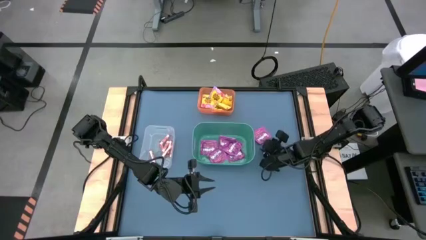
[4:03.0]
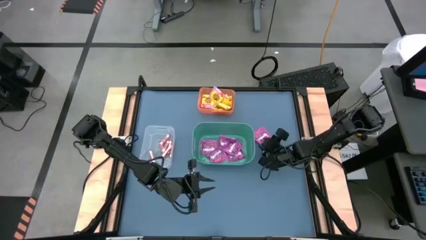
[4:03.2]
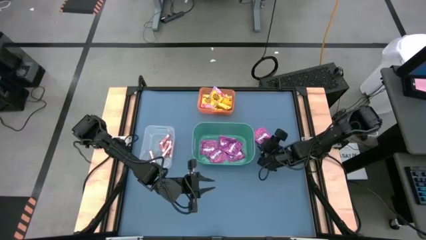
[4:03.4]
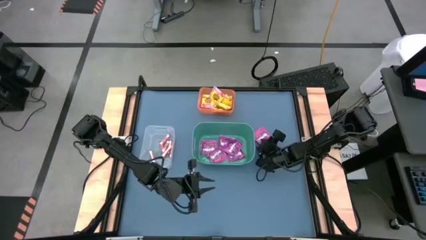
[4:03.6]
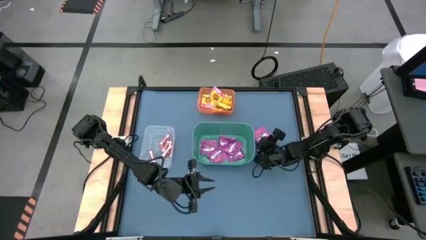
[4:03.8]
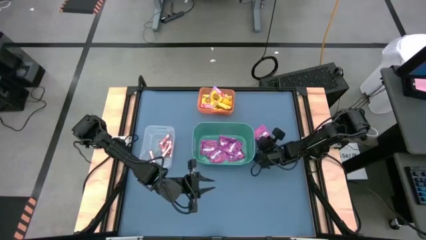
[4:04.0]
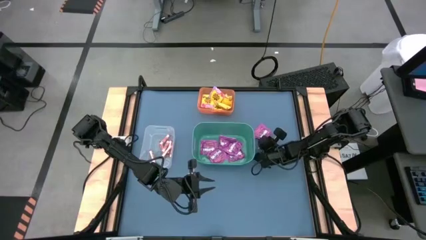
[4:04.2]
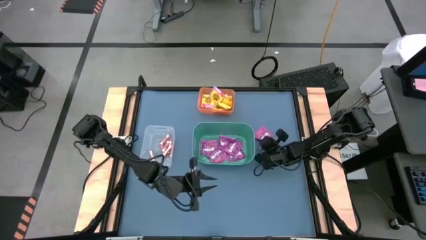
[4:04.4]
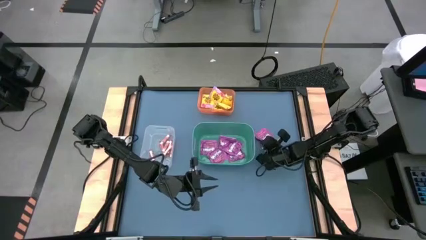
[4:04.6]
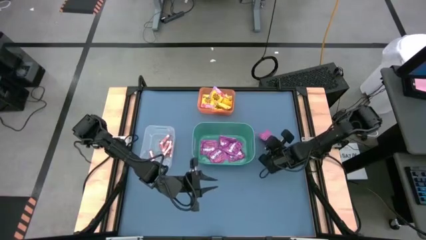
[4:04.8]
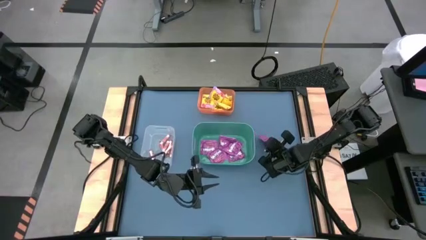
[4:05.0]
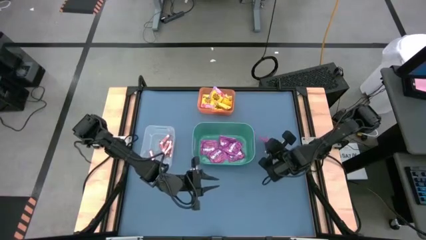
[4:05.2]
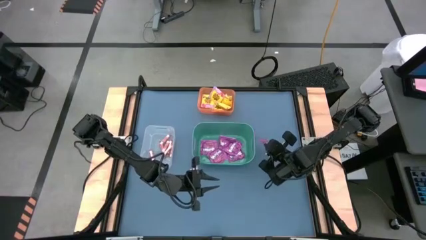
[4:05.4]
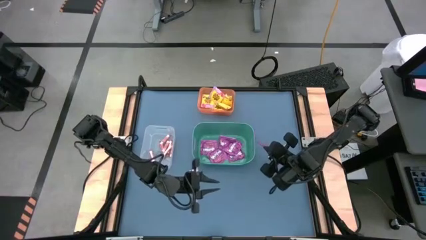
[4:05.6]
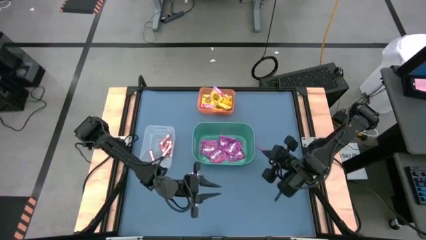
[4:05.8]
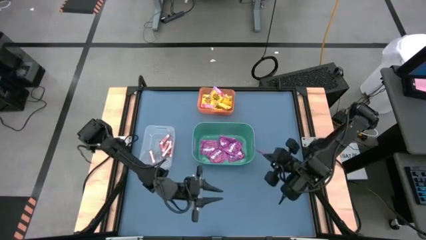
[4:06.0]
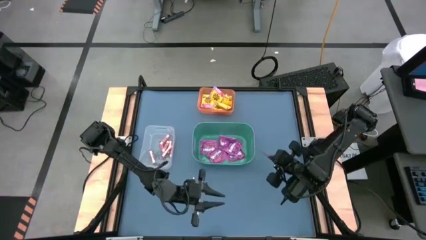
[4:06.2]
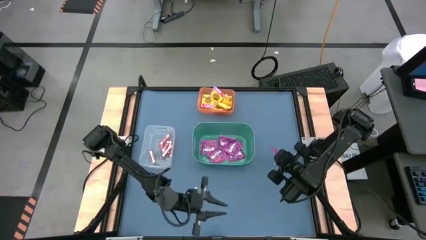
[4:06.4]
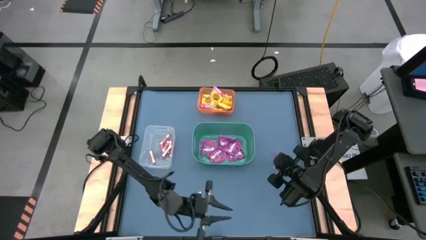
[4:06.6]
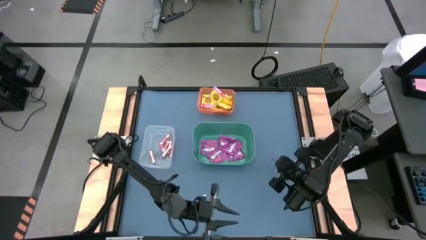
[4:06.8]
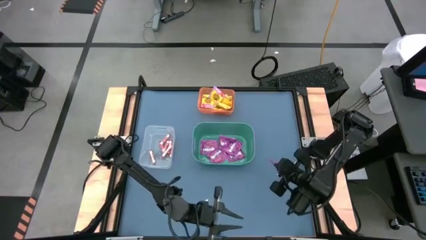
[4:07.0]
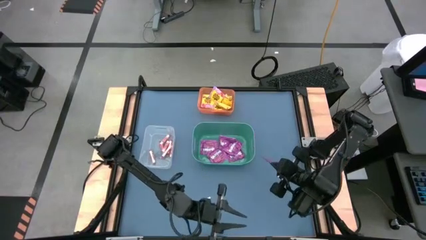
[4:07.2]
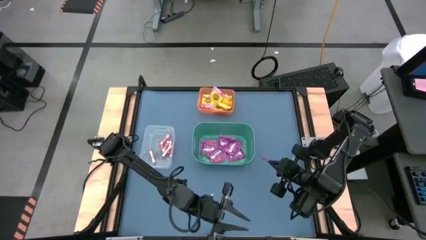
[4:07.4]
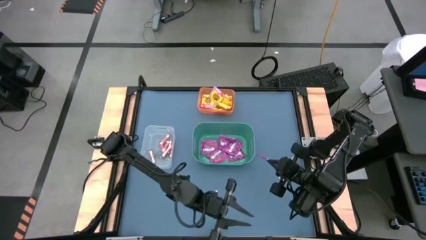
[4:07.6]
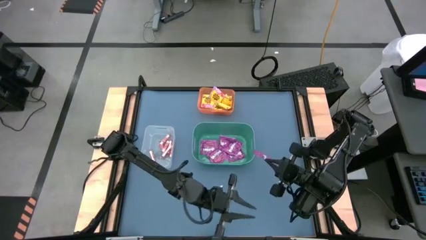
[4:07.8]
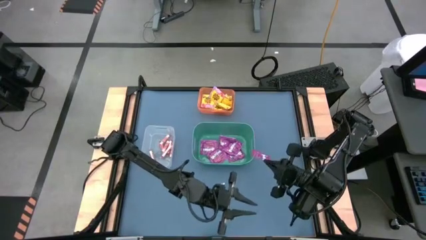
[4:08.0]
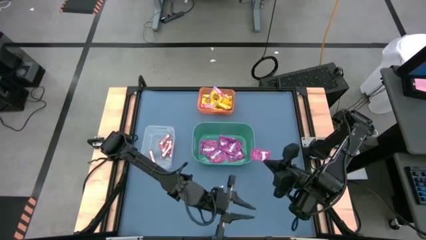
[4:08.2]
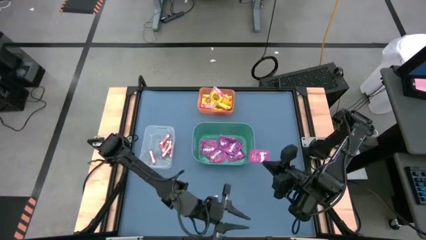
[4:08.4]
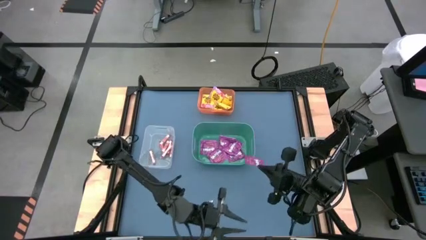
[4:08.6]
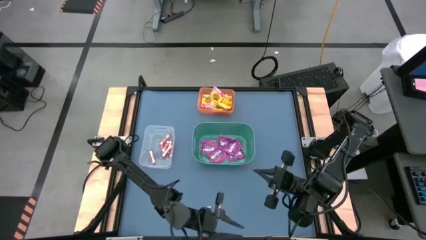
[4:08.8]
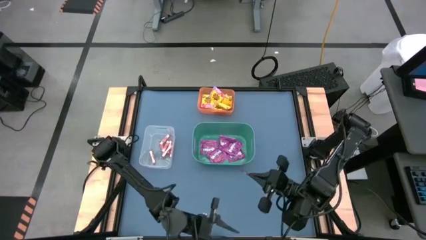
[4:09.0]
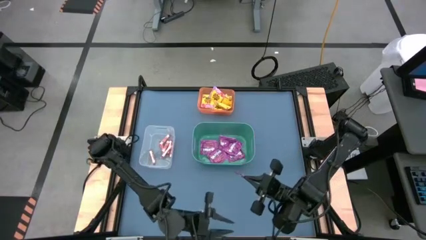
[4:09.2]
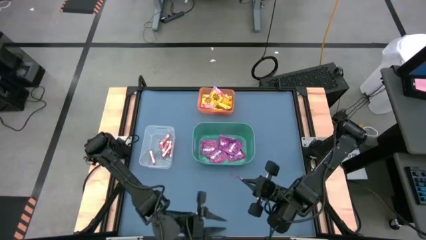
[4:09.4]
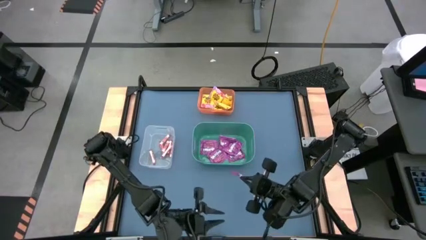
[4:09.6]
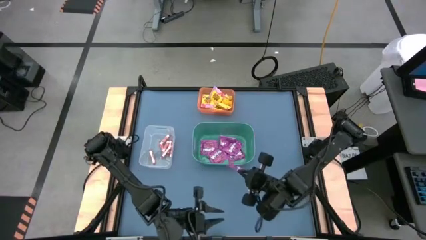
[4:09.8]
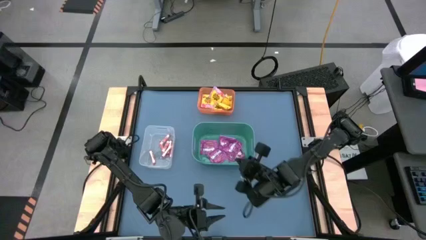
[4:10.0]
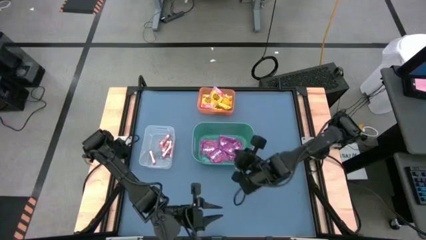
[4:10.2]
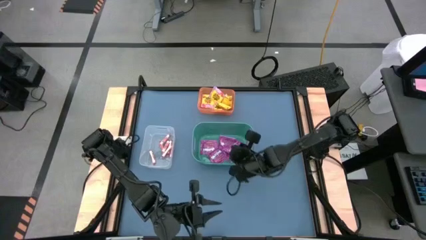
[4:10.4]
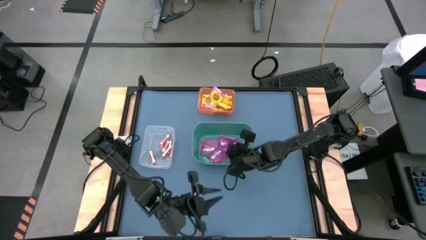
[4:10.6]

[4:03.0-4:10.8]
Task: Sort candy
Put the purple candy into the green bin

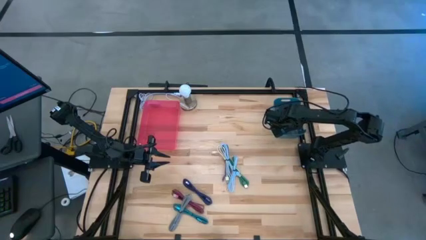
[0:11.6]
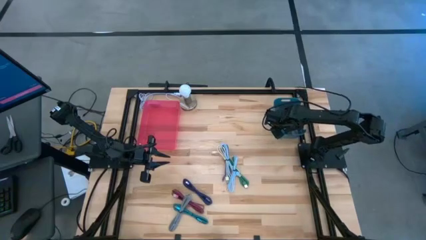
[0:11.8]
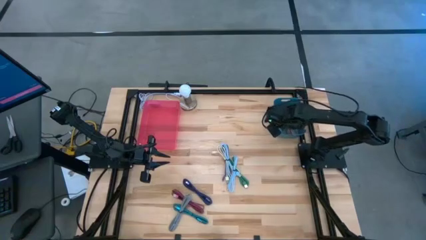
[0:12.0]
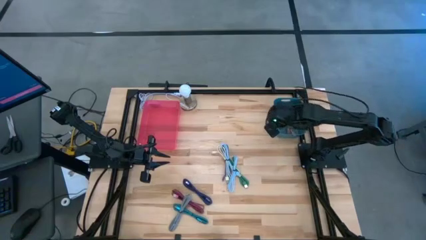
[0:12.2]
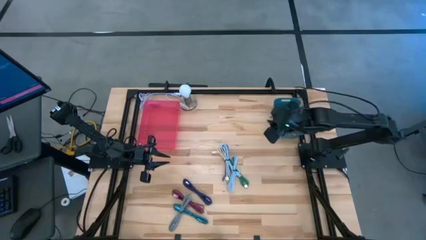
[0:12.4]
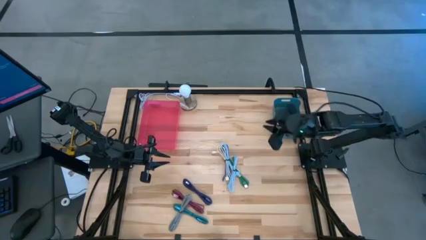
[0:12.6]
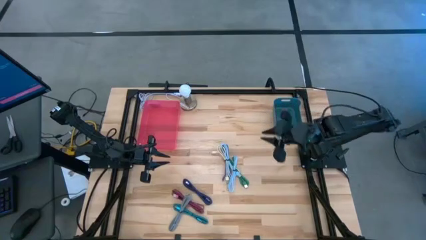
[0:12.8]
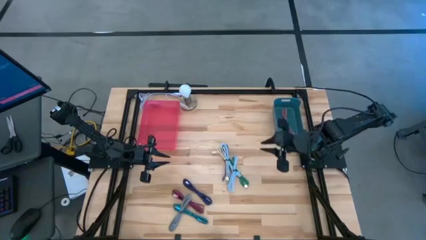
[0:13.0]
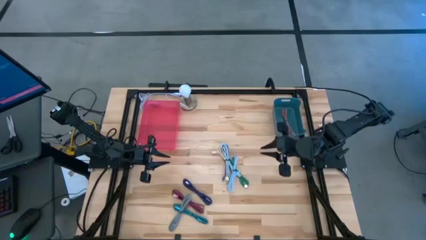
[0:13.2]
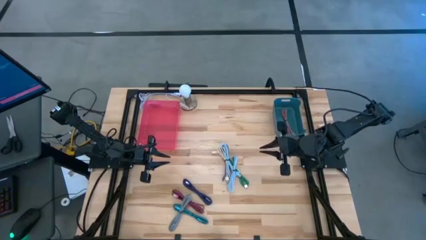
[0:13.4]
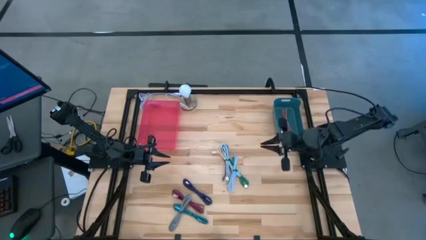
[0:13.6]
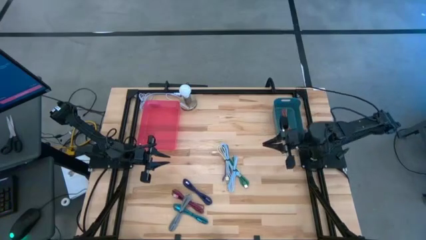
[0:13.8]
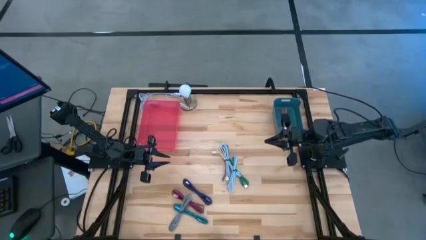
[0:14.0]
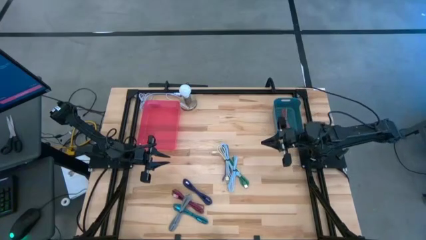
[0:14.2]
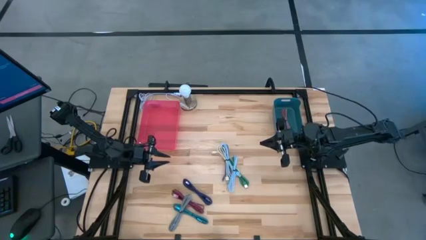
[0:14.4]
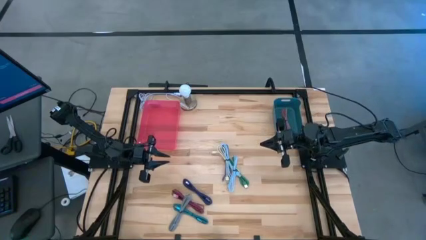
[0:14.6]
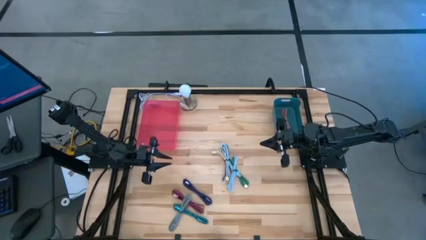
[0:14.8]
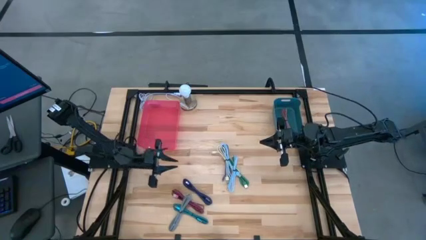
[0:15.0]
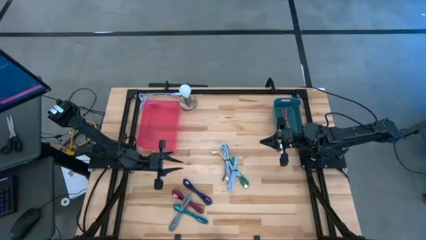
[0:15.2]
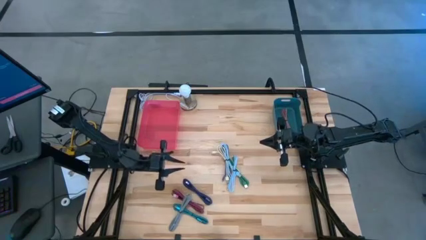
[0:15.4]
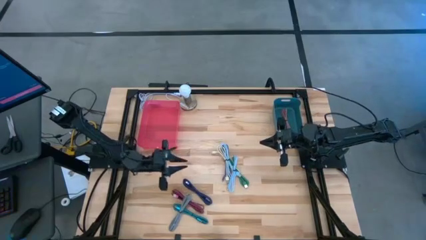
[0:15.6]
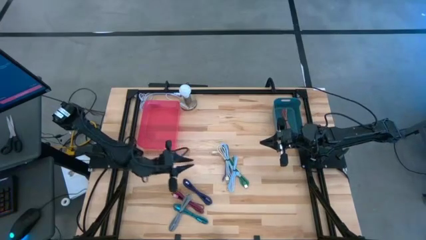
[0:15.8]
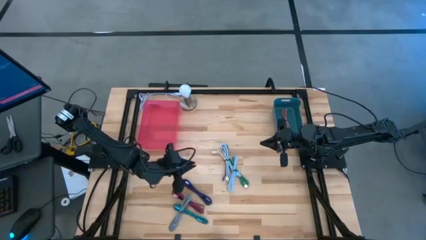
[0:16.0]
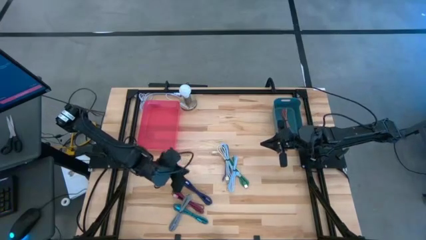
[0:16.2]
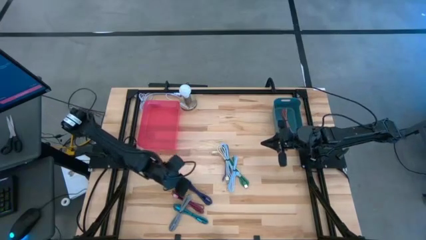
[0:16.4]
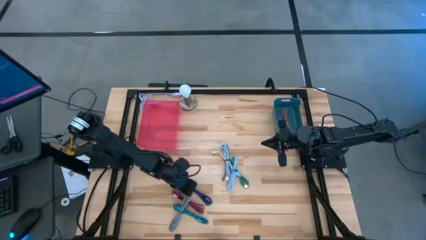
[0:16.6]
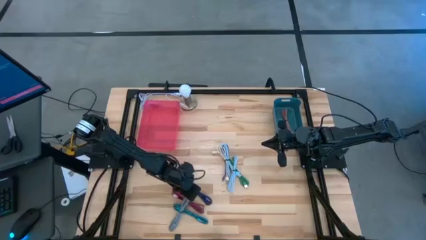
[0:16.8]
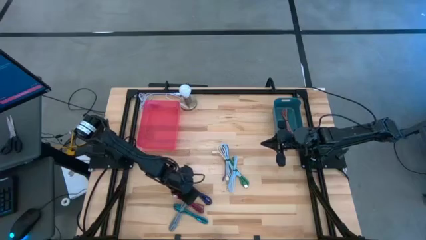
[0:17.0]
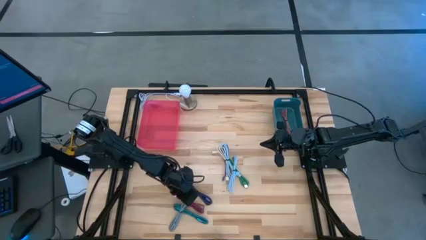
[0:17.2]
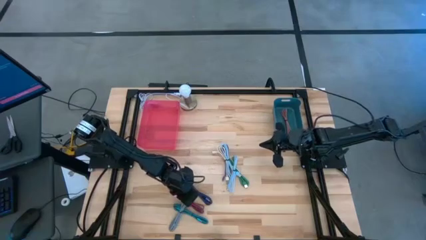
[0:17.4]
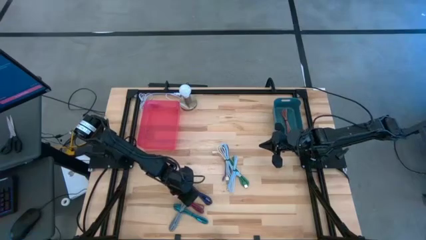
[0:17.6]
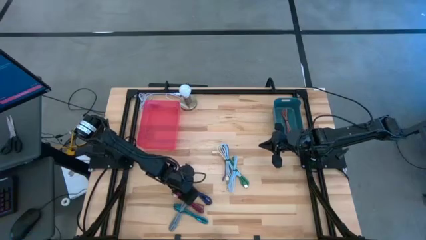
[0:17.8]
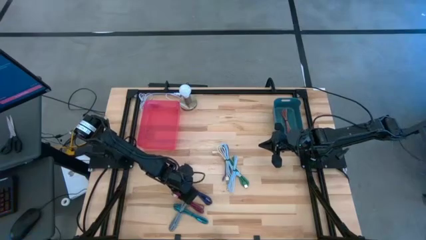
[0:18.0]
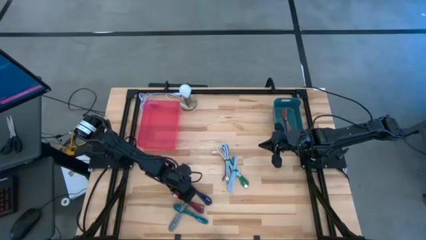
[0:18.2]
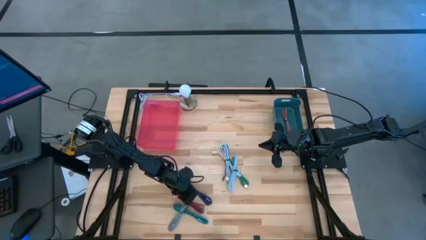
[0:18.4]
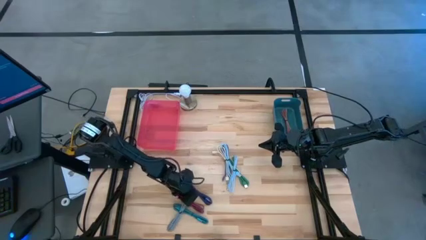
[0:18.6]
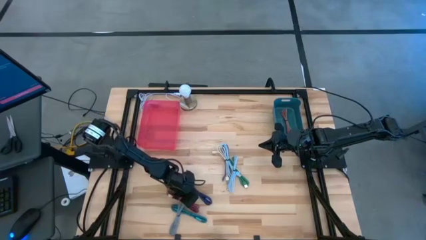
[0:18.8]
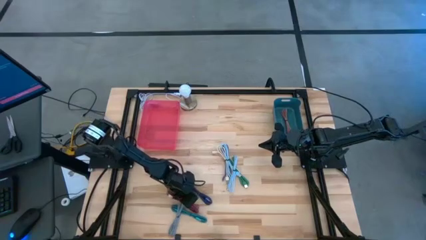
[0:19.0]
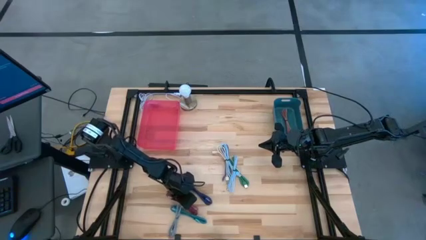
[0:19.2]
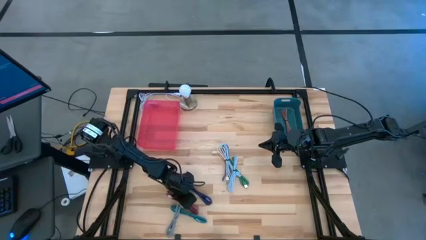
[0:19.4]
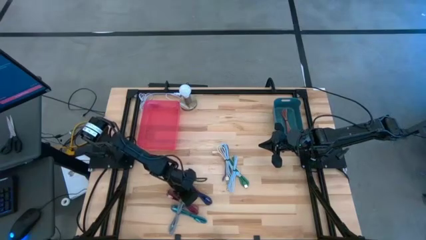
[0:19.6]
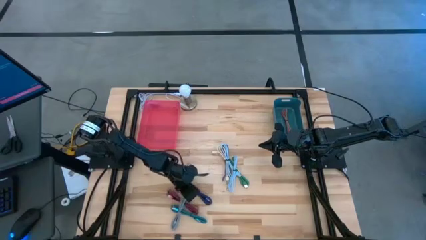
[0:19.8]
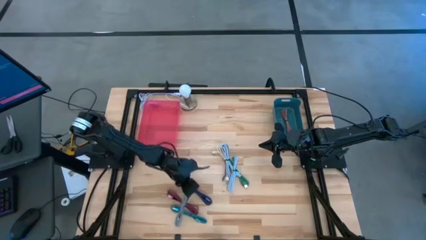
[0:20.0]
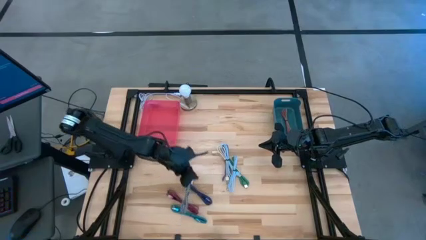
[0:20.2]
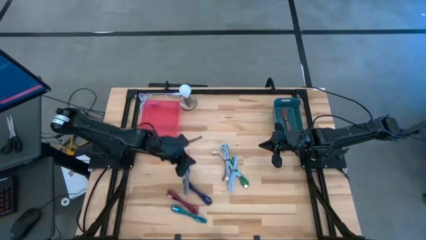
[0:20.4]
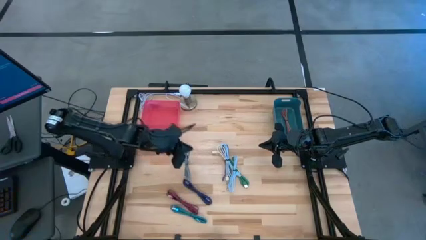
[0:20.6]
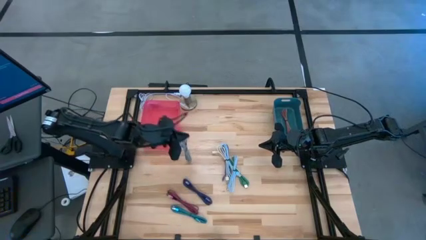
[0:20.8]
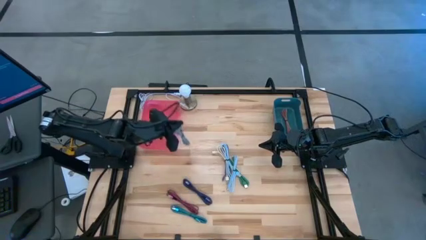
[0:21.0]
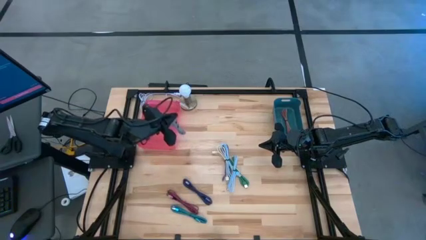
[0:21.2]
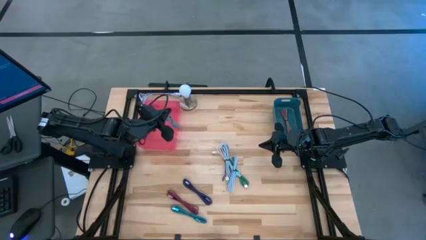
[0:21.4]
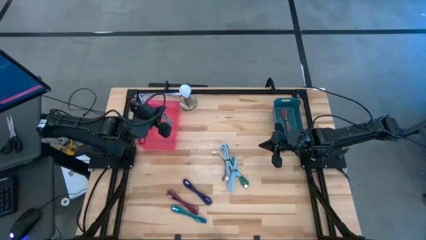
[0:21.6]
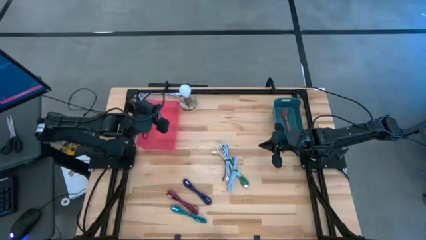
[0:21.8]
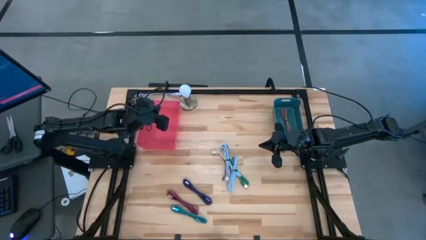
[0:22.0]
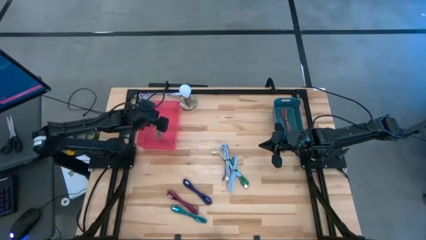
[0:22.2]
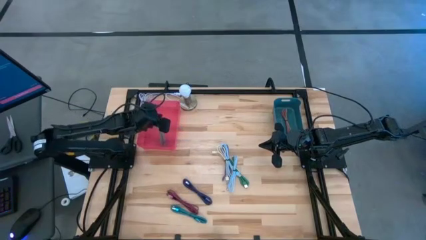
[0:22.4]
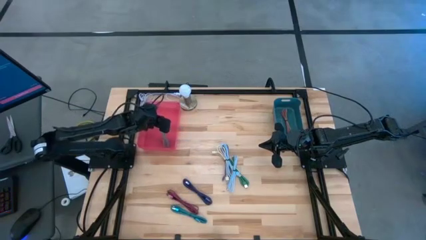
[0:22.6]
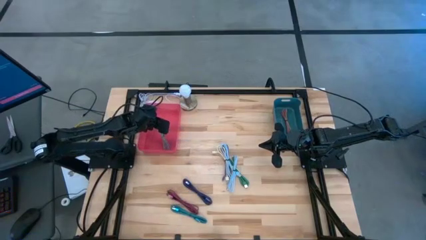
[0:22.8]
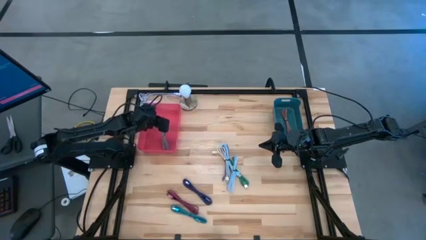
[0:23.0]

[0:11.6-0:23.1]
Task: Pick & Place USB Port
Put the black patterned charger cable into the pink bin
